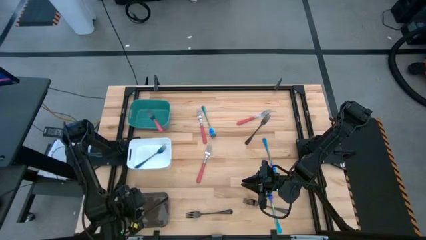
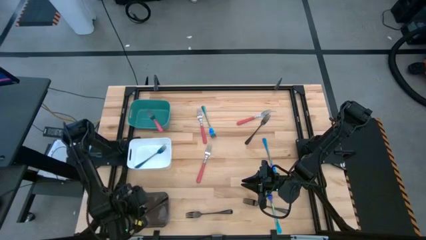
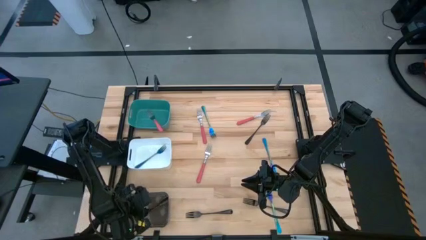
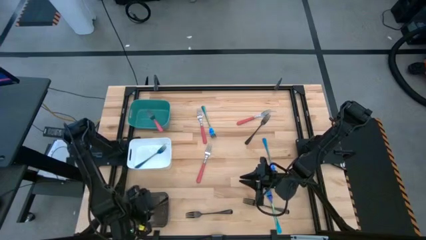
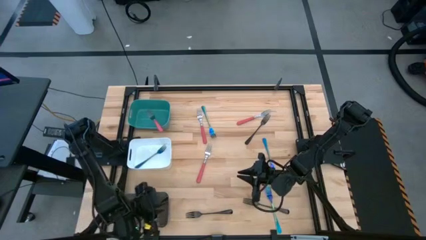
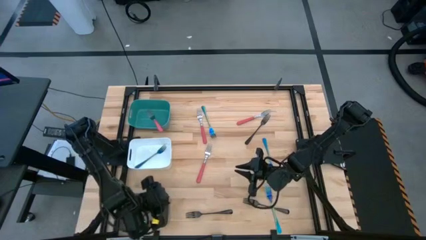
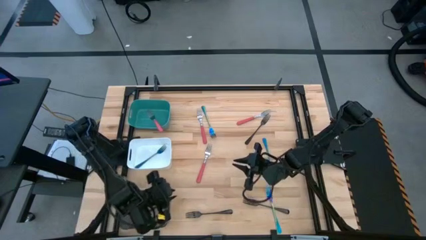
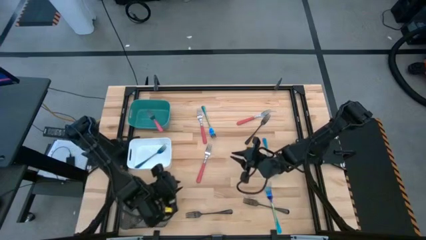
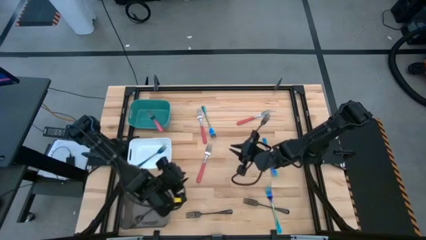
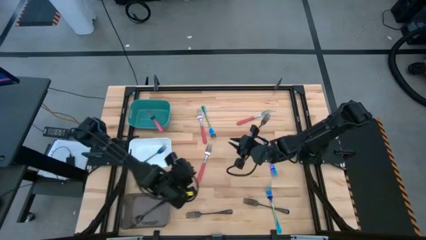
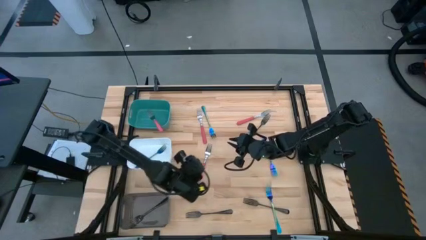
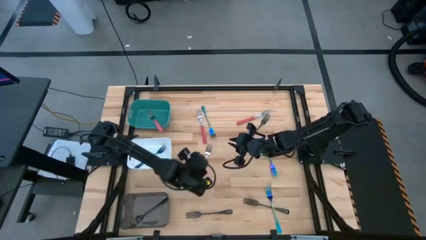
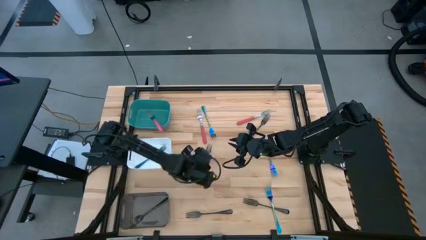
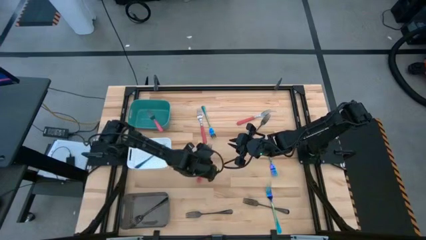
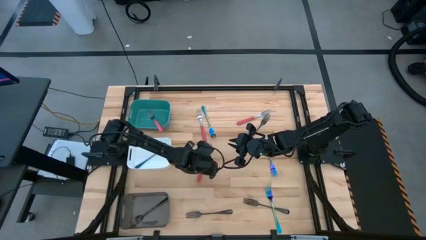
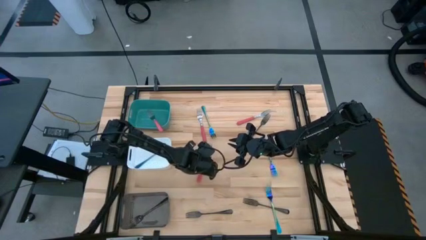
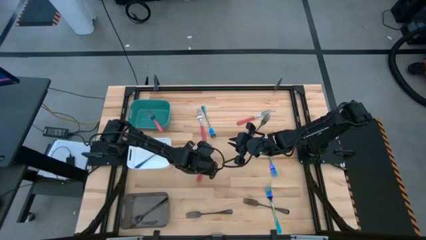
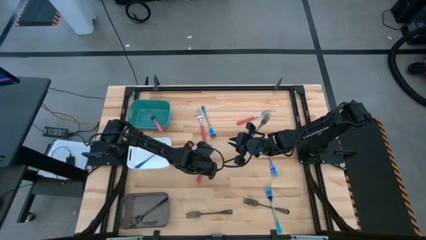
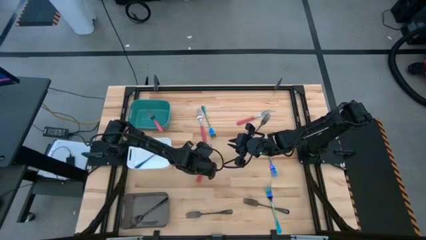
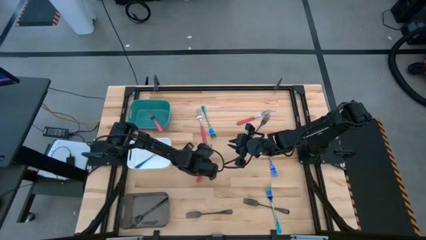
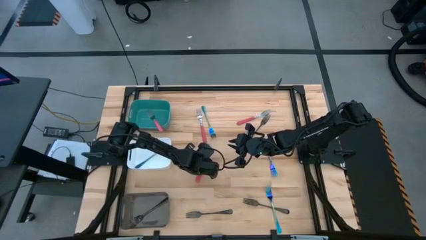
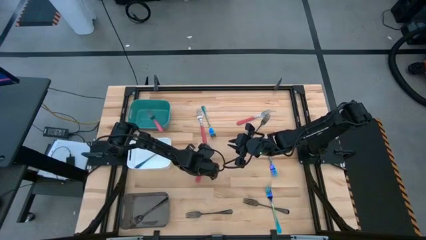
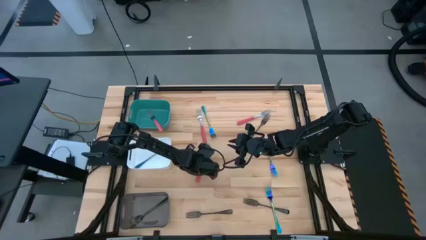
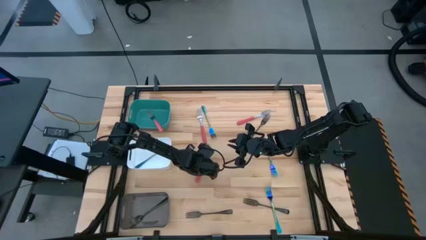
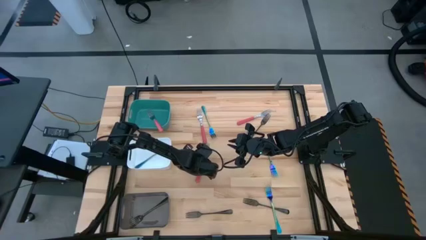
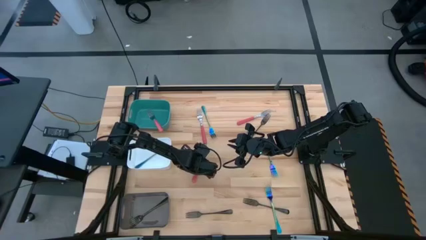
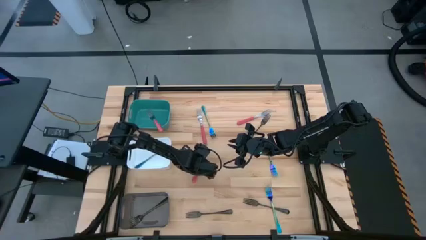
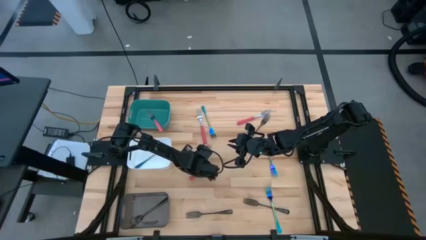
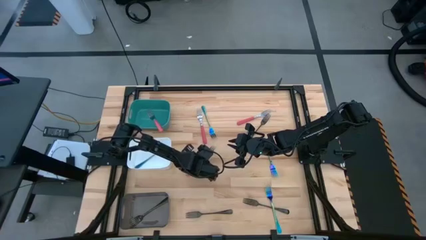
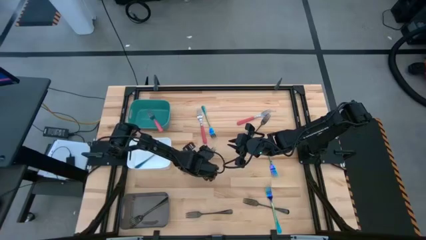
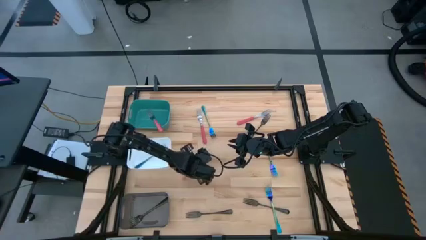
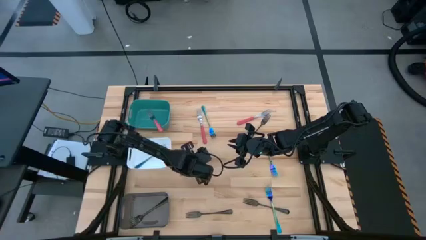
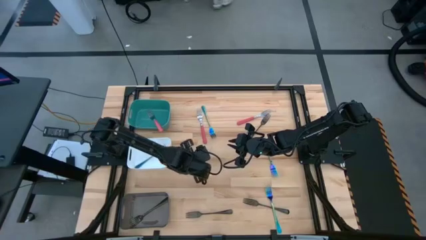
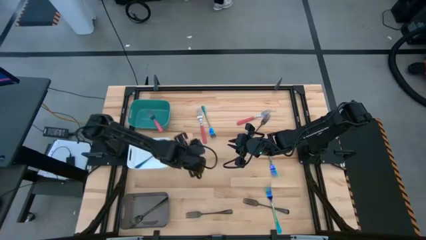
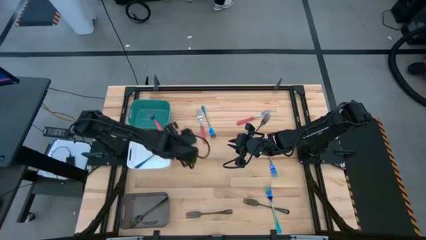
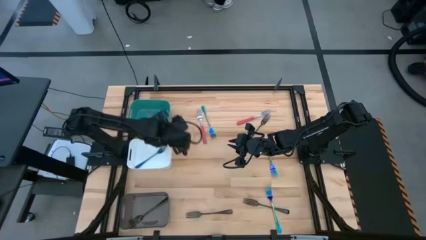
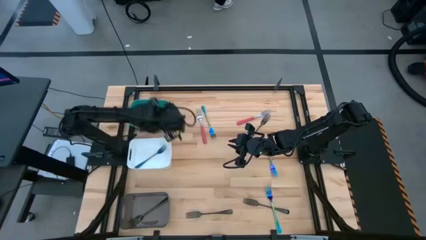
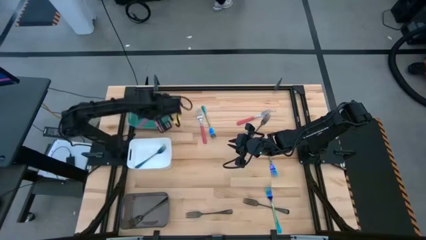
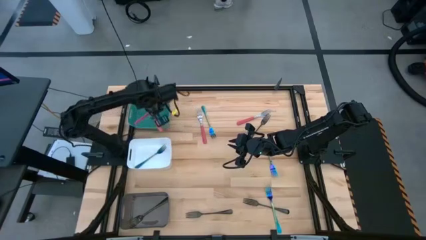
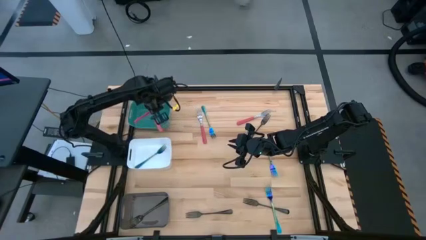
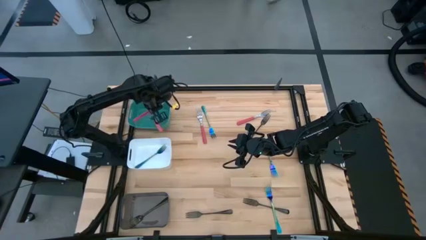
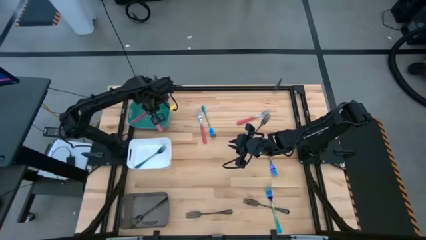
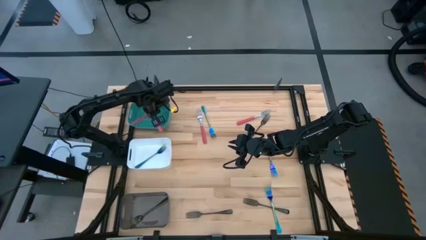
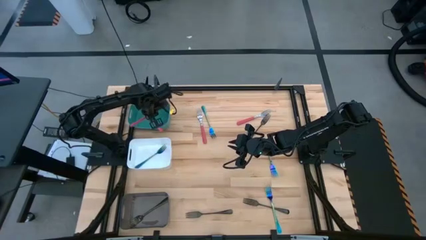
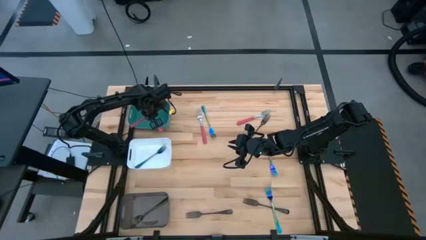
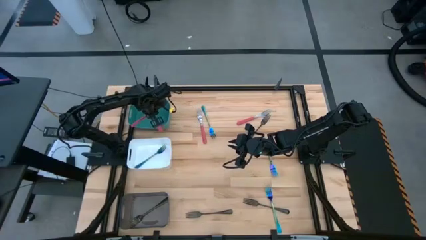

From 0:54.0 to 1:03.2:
Task: Sort silverware by color (type)
Put the pink fork into the green bin

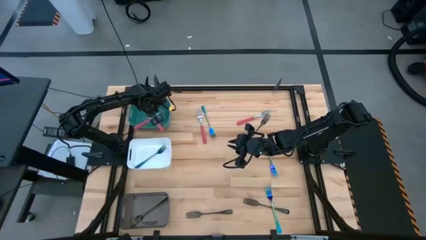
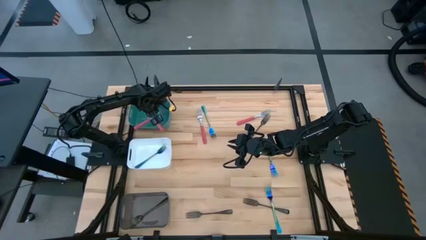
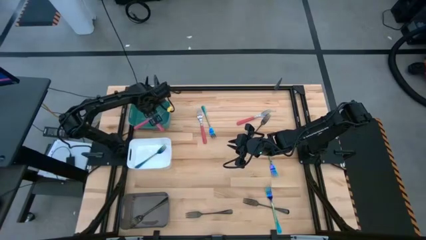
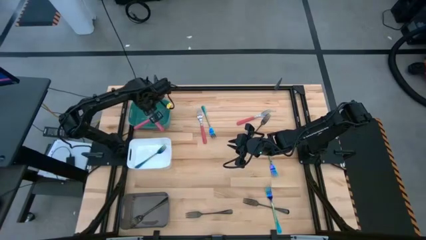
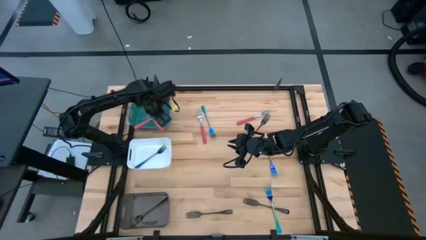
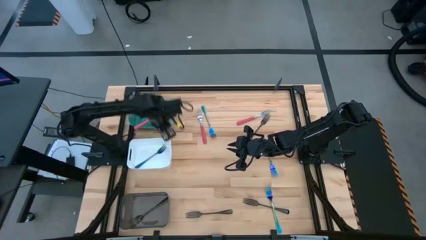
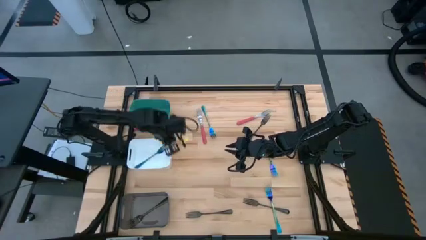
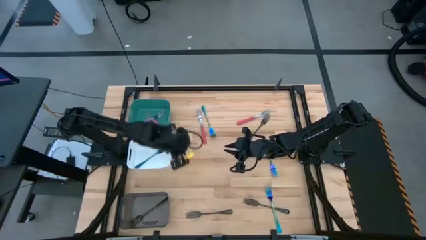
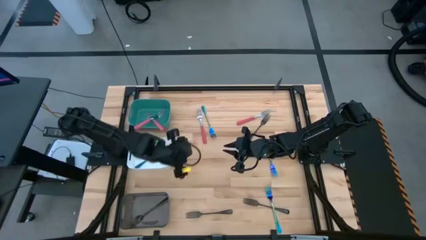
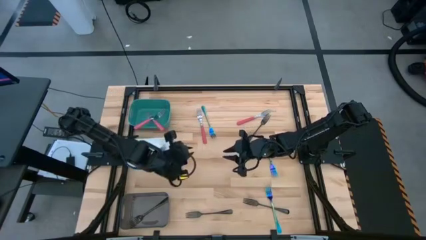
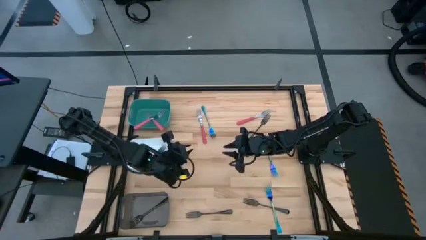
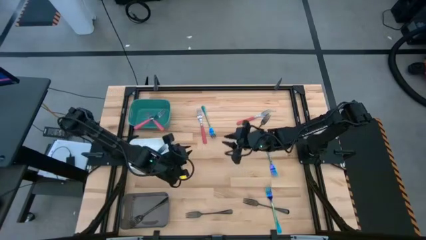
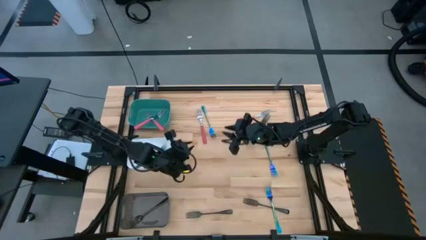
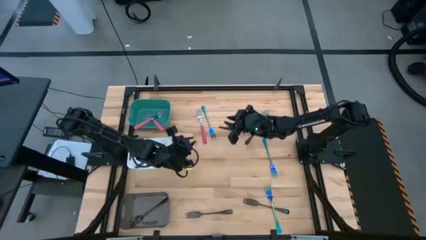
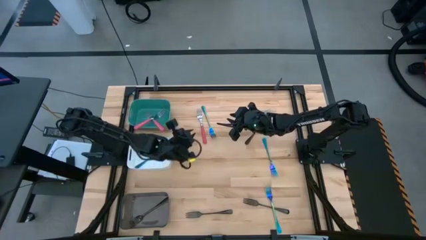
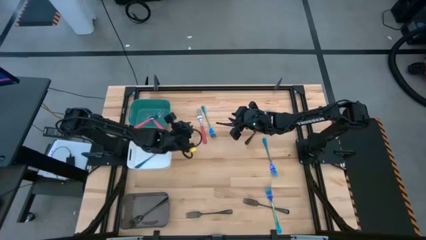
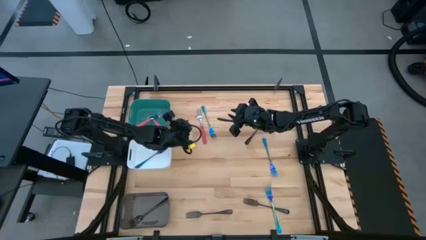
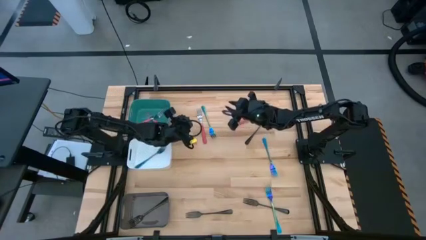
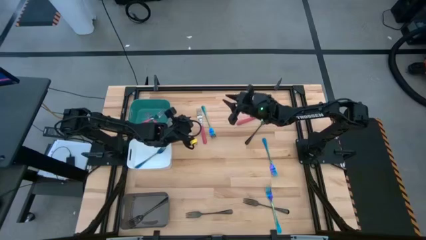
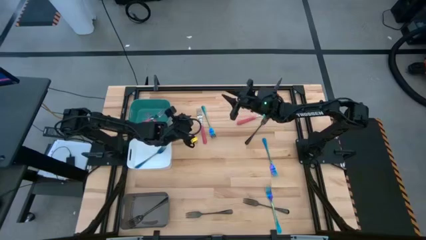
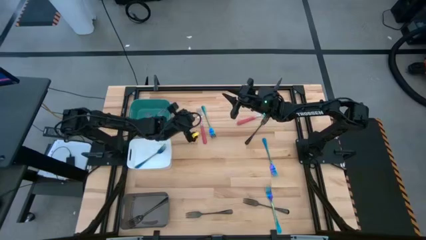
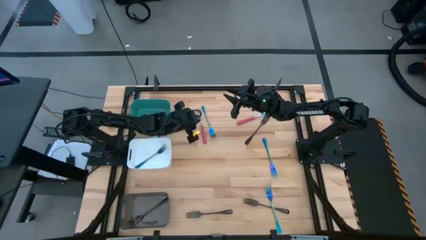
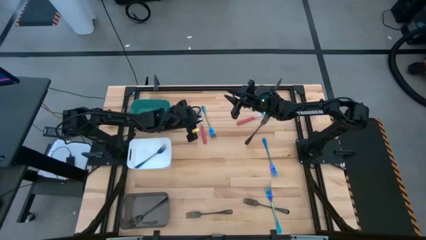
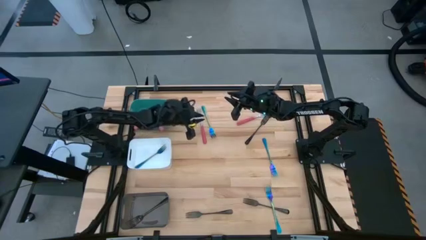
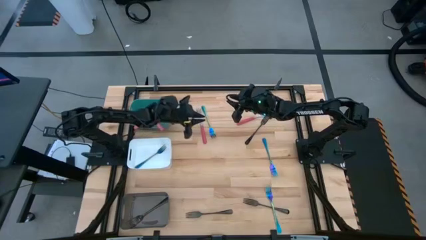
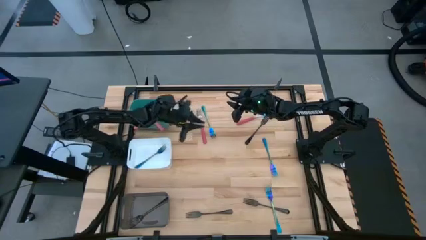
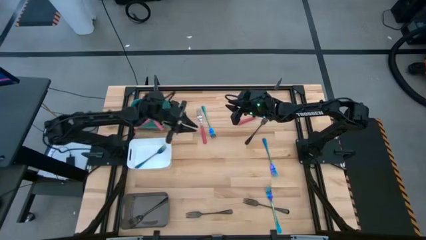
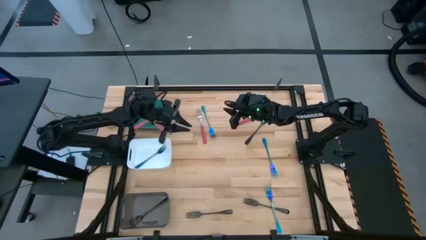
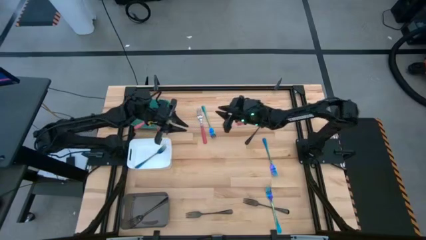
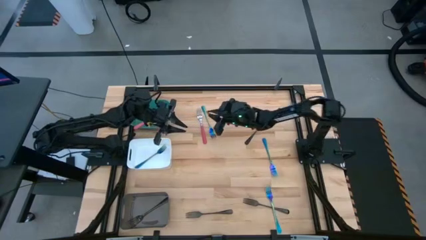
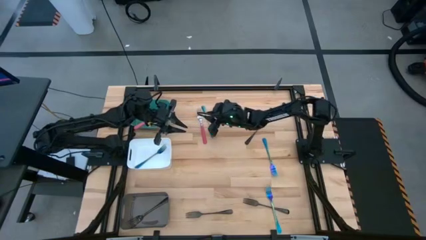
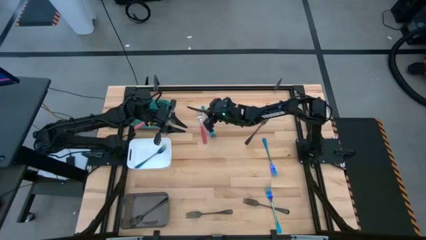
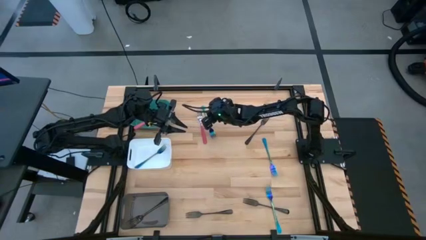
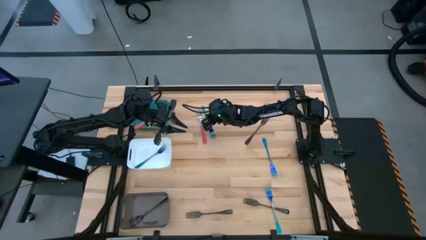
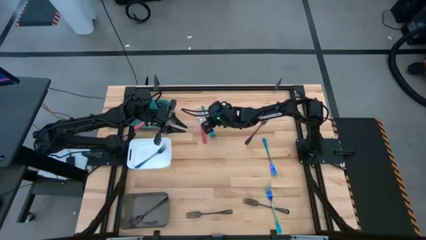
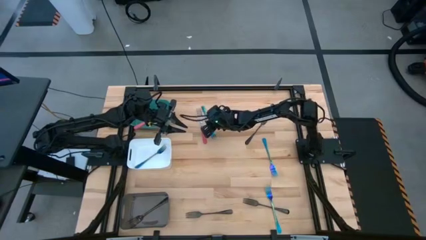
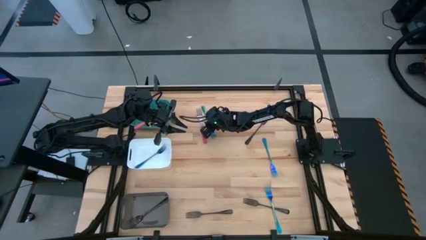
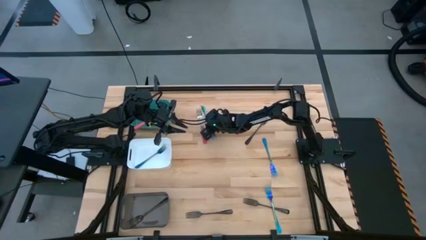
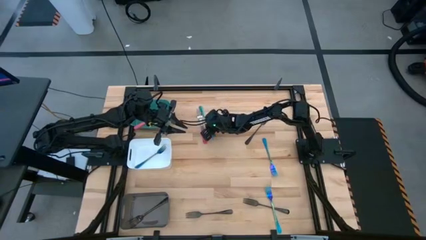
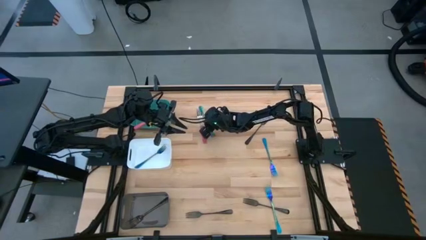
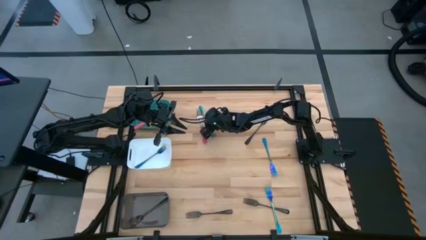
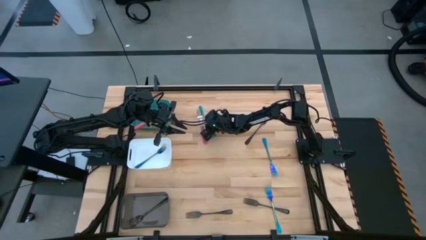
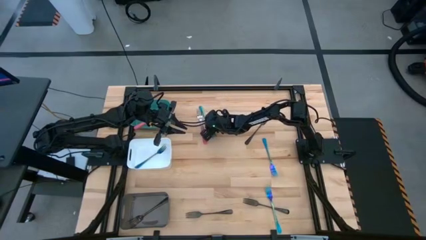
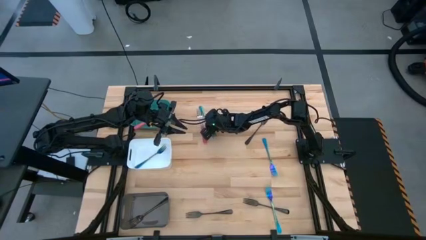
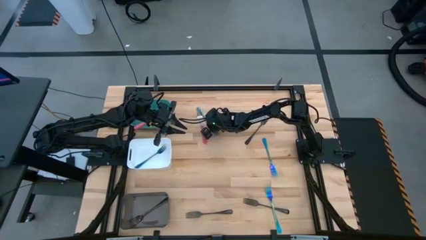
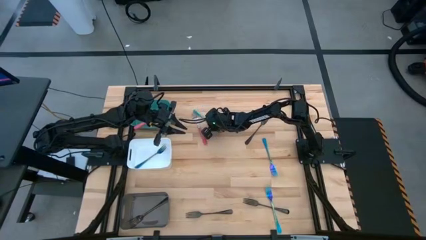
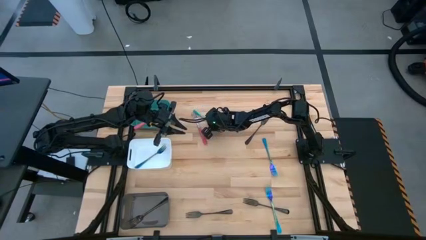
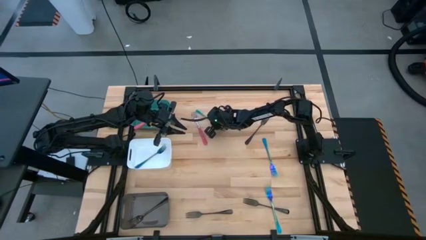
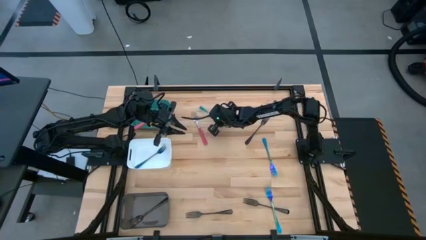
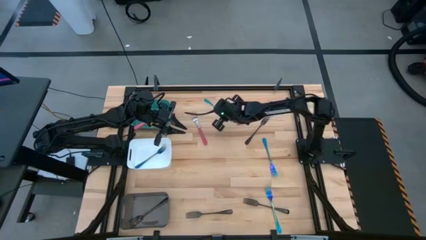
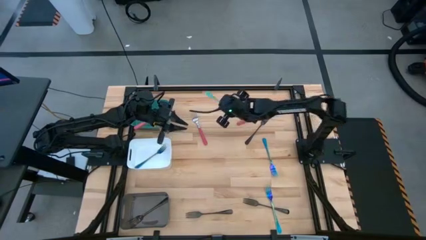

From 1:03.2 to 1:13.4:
Put the blue fork into the white bin
